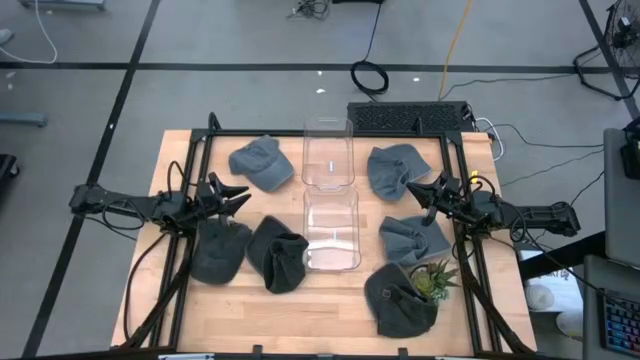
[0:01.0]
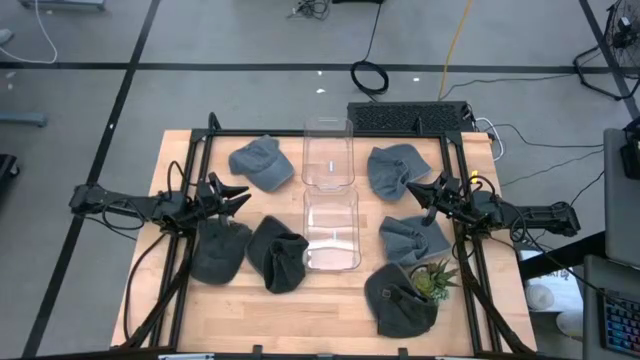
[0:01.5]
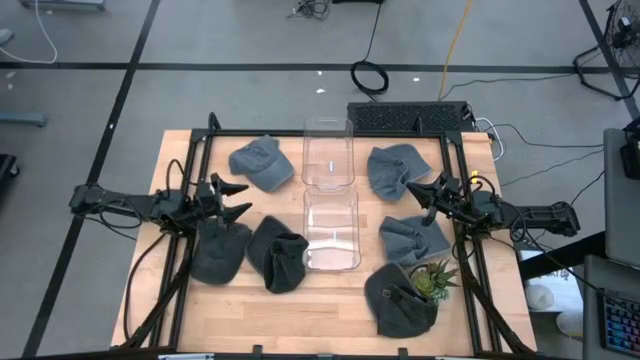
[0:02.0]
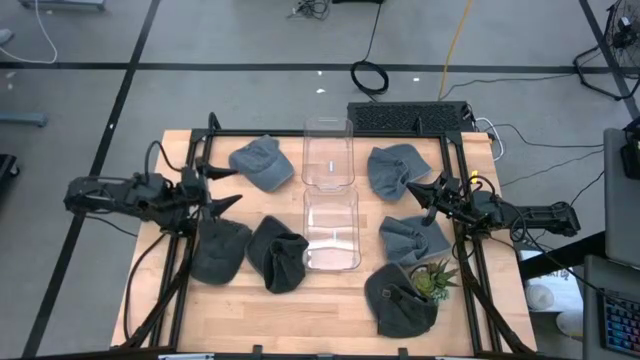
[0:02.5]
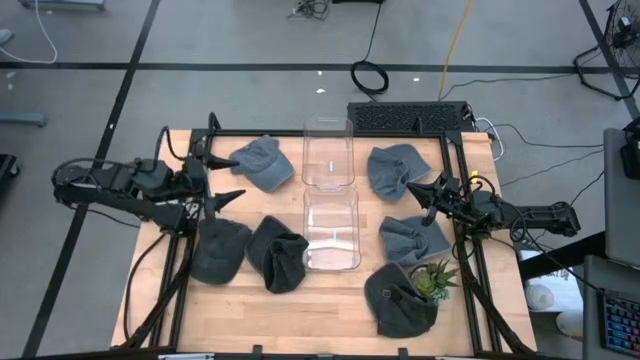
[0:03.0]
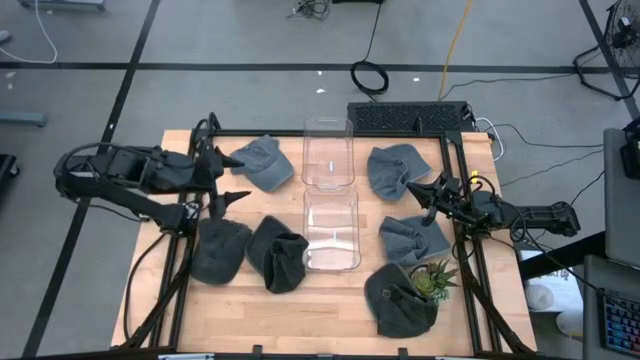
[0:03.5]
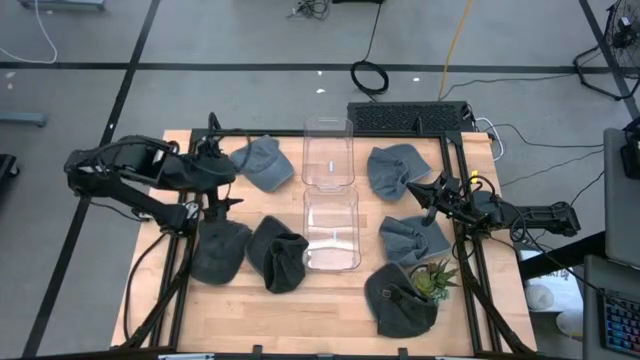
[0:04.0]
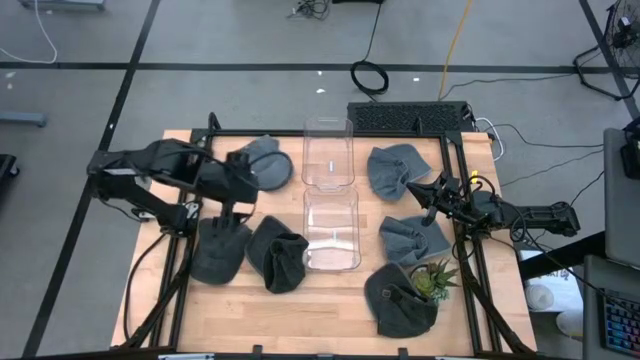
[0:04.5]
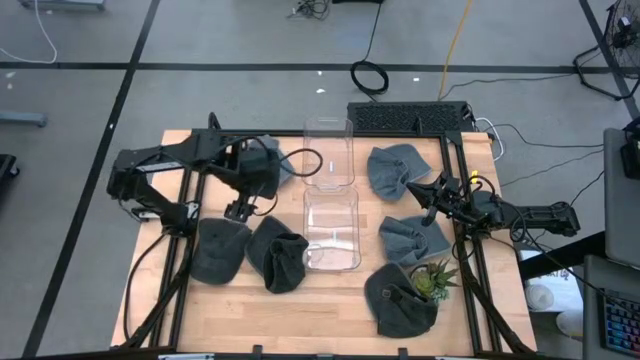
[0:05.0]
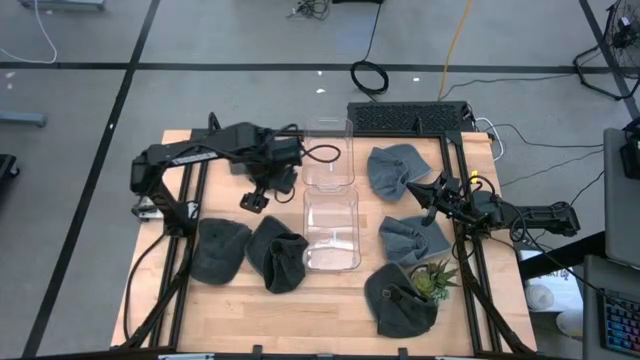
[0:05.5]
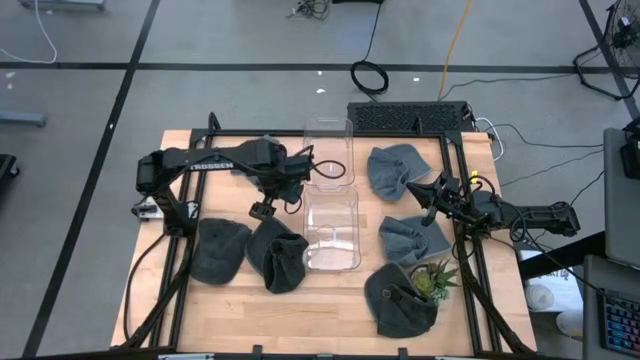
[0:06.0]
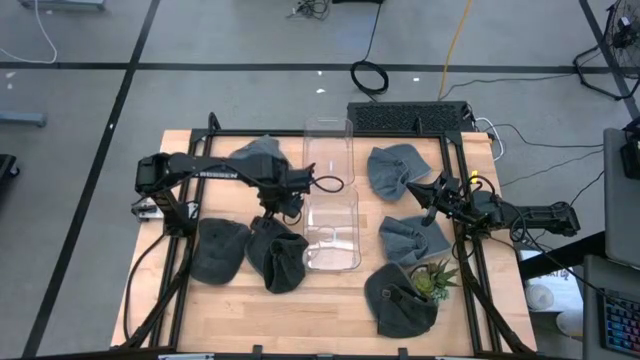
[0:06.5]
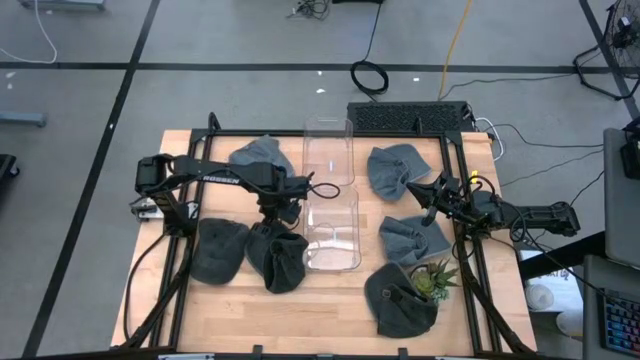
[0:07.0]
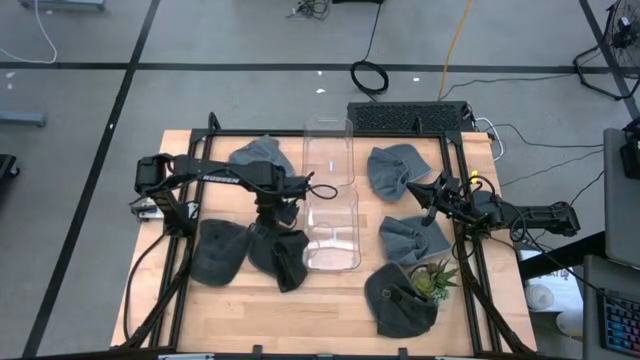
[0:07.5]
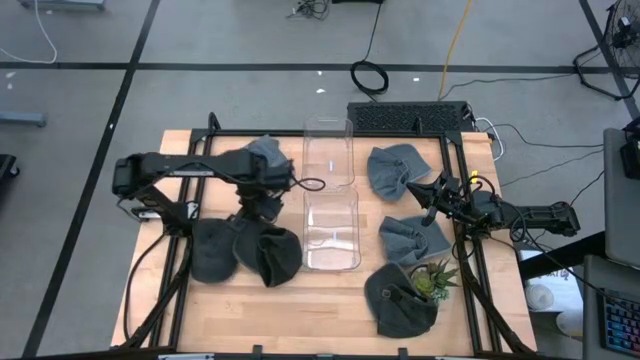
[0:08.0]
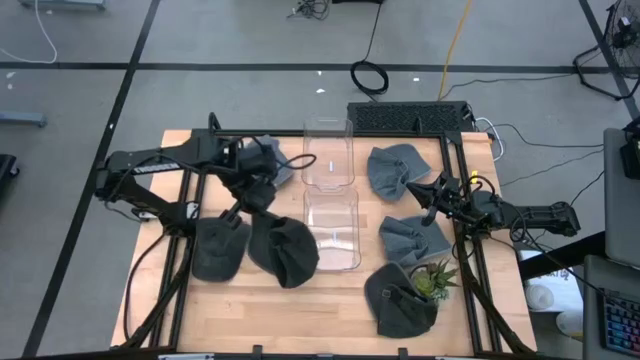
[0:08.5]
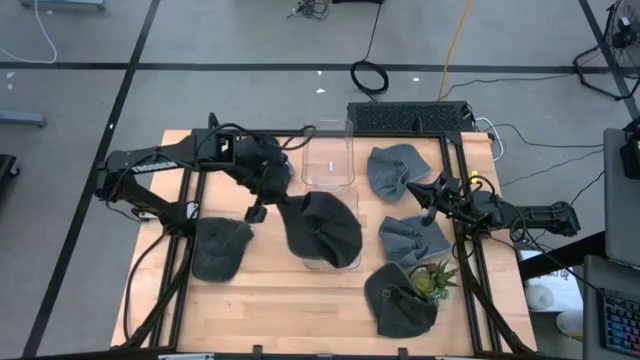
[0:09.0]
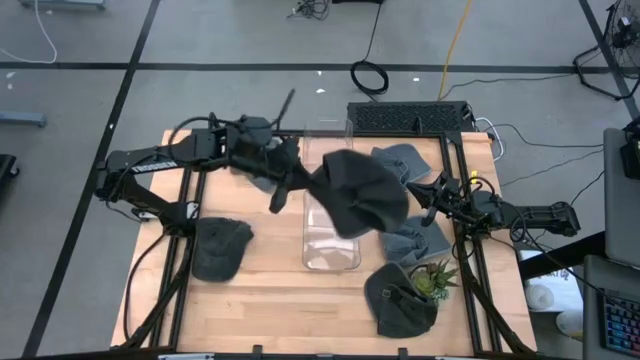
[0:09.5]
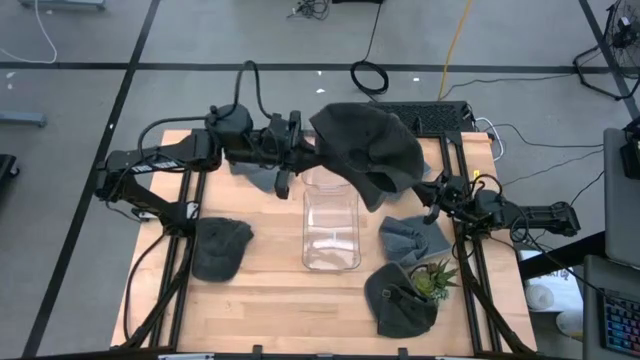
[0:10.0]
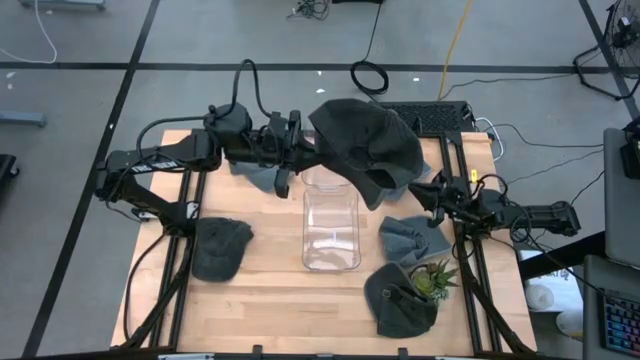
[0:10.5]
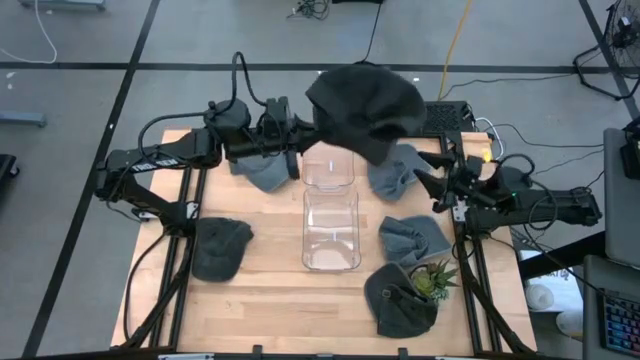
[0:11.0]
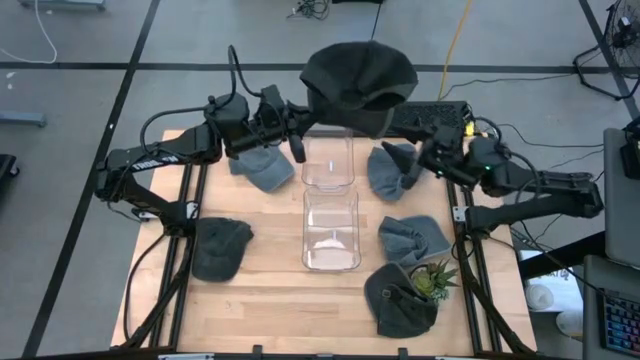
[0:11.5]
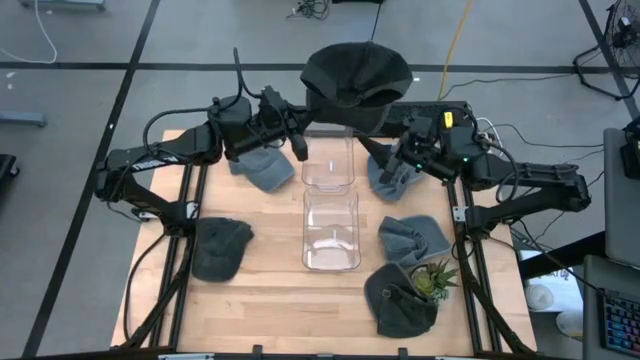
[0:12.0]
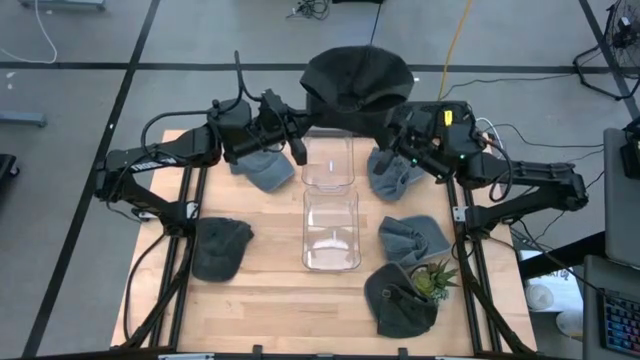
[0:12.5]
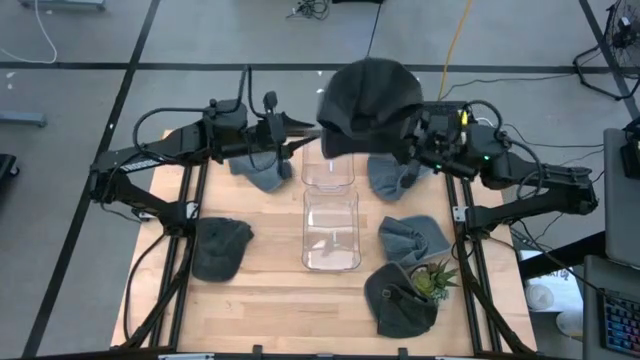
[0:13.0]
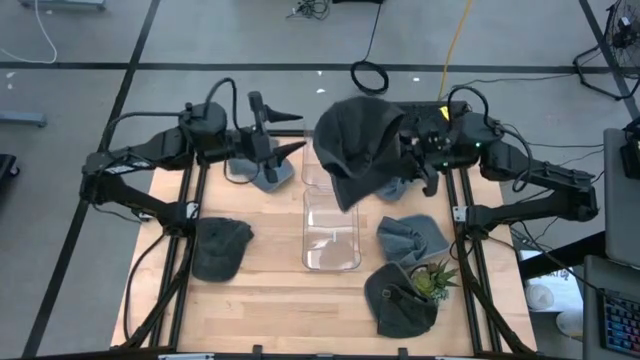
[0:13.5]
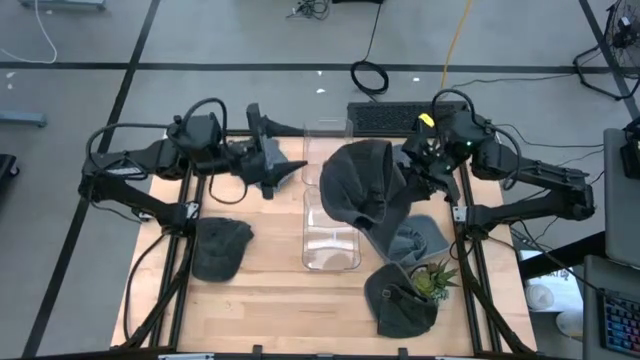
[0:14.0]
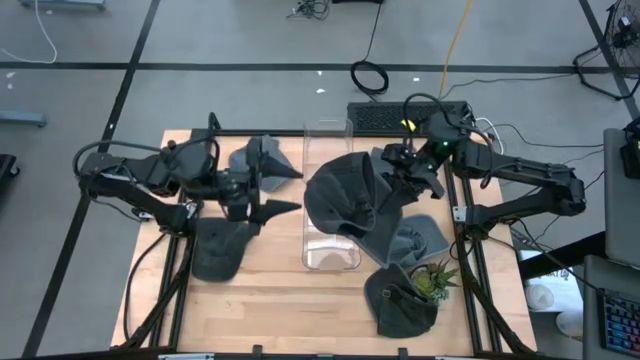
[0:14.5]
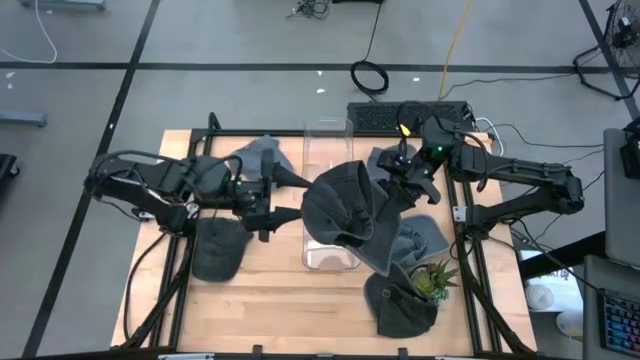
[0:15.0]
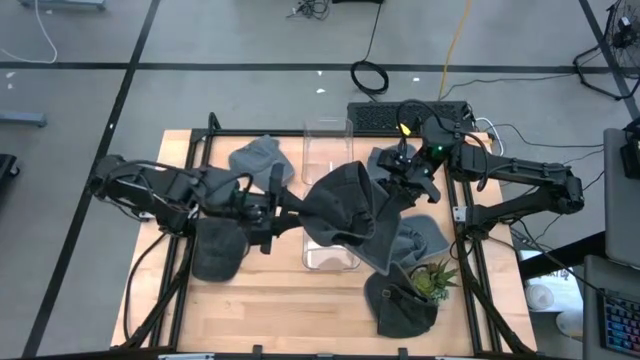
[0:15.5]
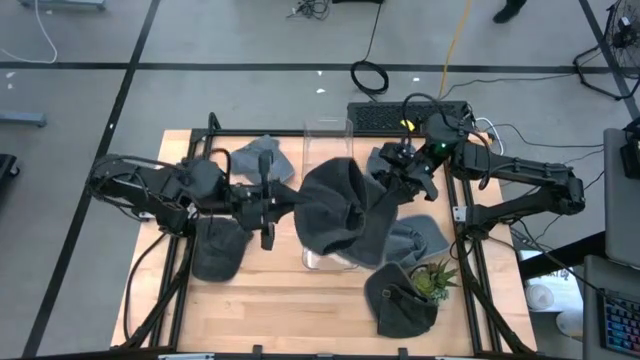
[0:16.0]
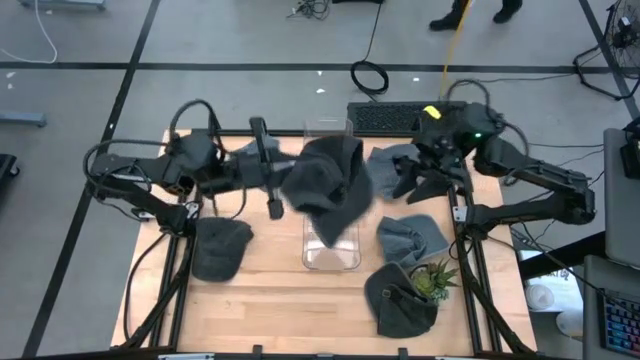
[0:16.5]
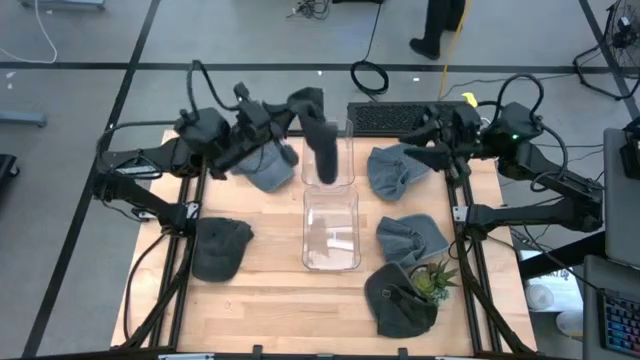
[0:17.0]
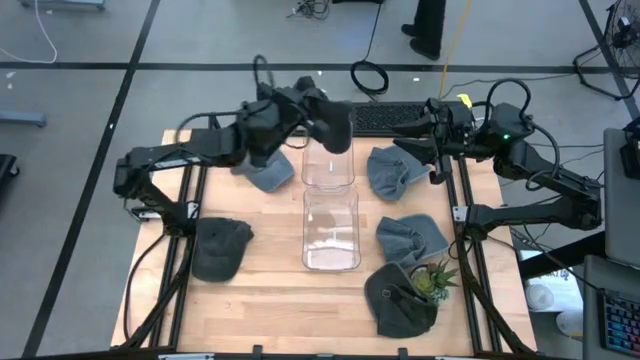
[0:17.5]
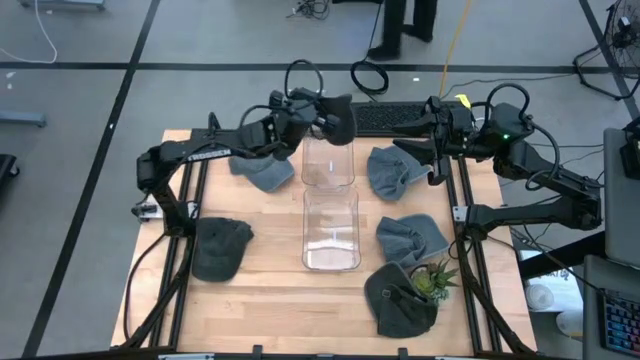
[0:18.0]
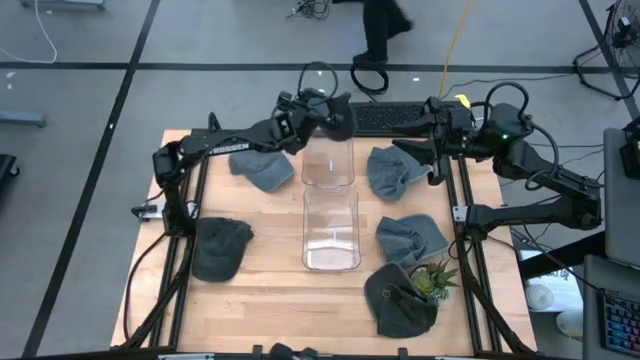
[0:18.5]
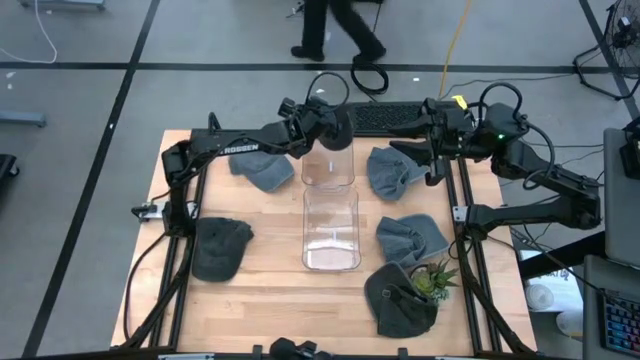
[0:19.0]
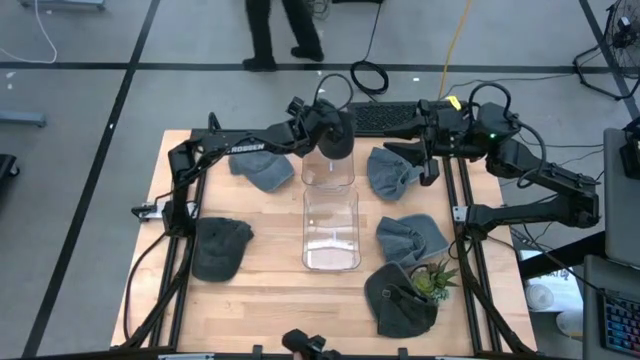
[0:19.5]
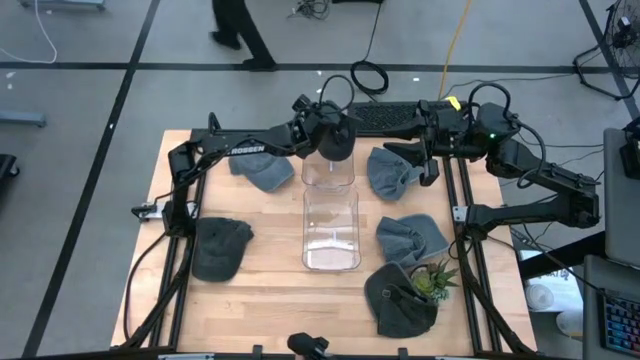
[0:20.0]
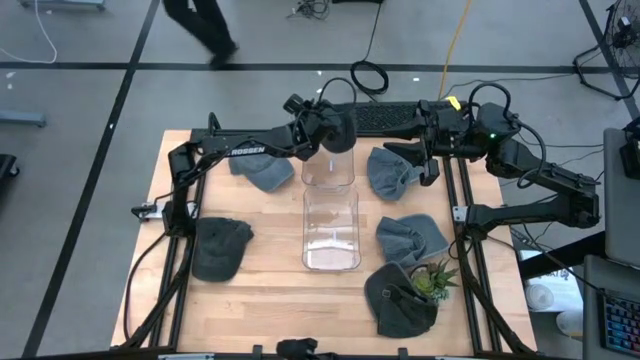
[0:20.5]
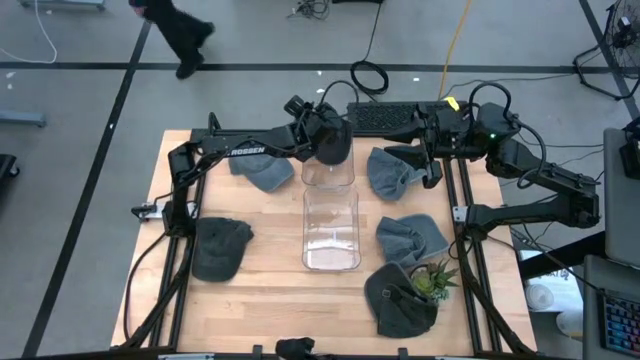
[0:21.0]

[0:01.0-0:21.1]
Task: Pick & Place hat
Put the top right black cap into the top transparent bin
